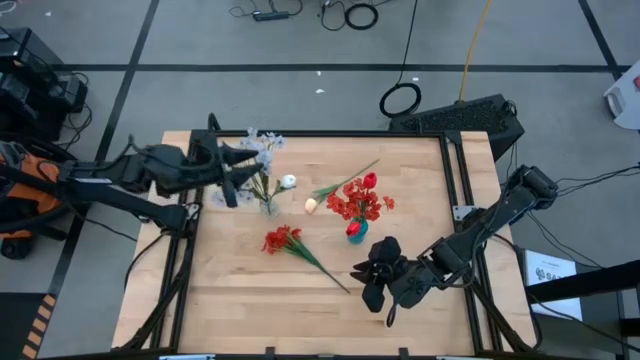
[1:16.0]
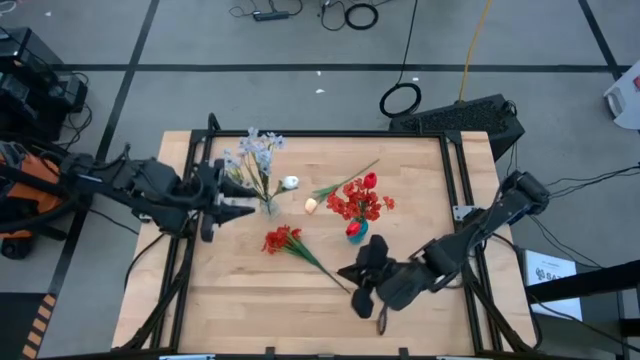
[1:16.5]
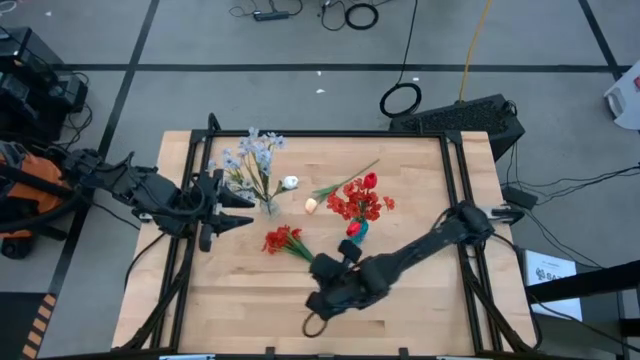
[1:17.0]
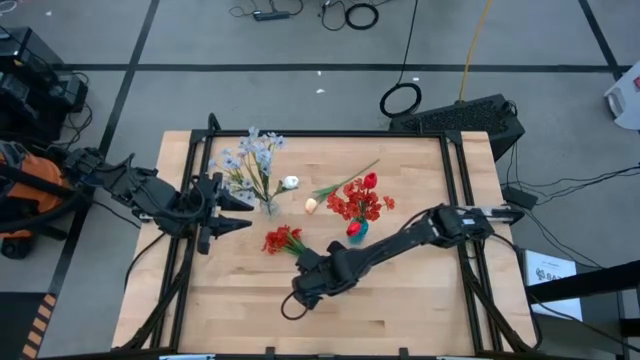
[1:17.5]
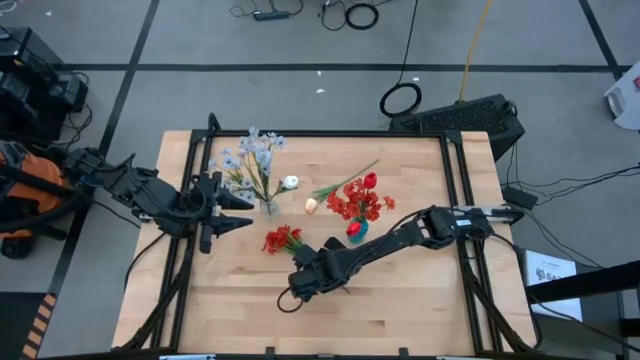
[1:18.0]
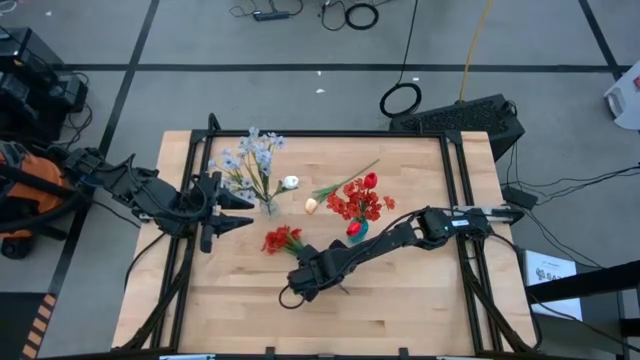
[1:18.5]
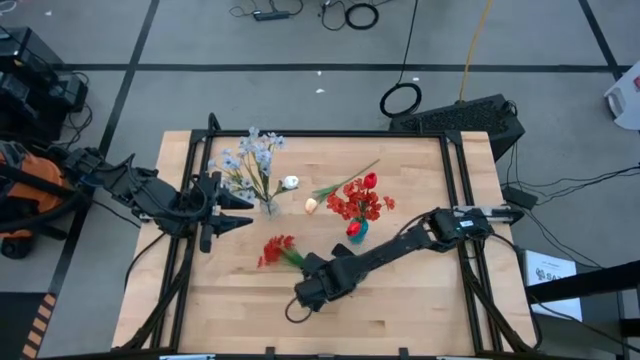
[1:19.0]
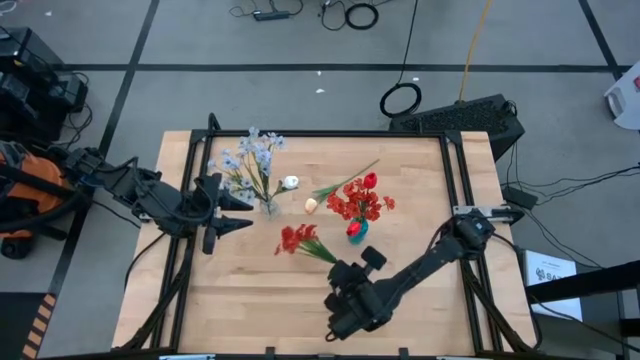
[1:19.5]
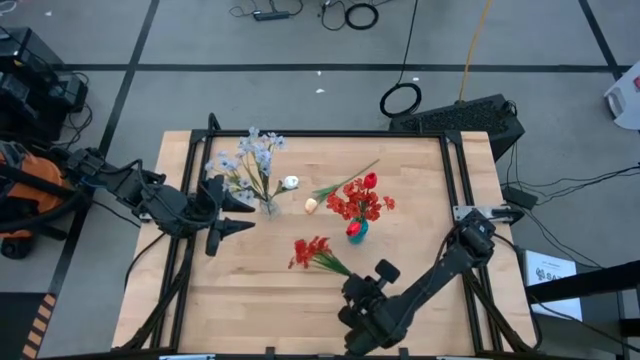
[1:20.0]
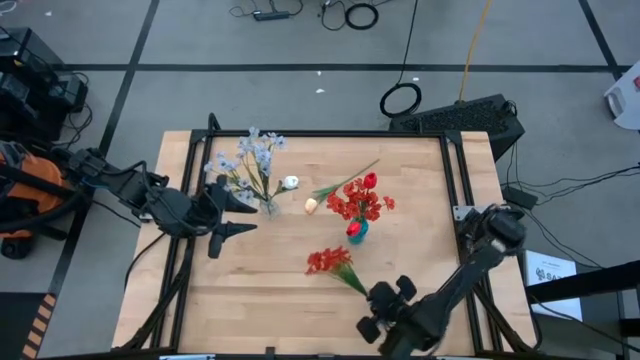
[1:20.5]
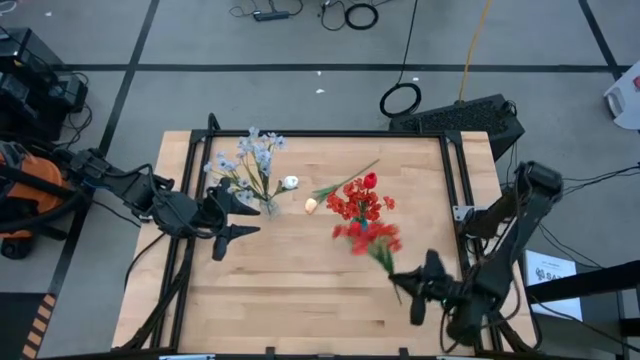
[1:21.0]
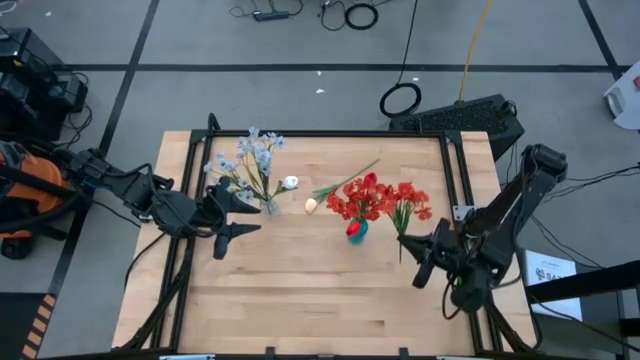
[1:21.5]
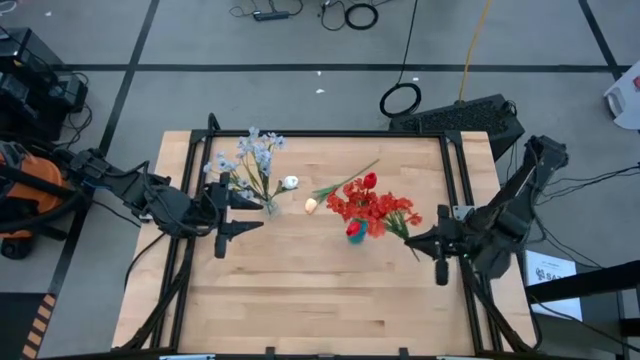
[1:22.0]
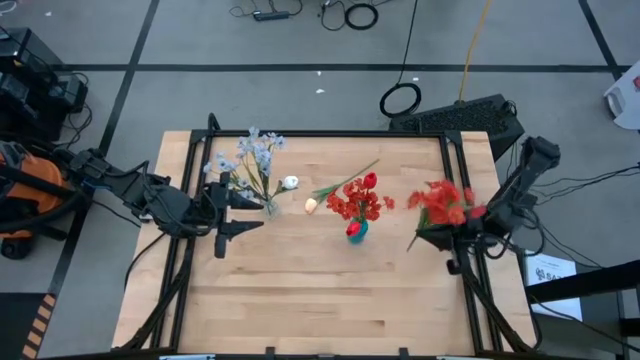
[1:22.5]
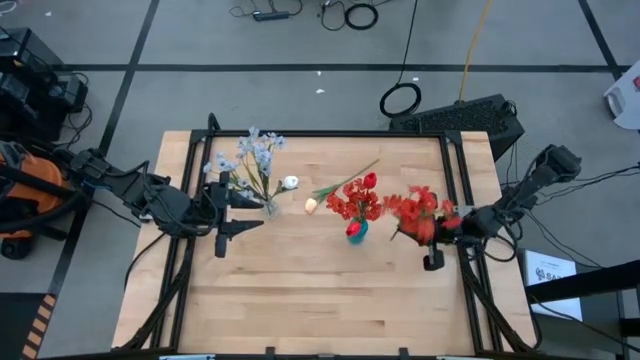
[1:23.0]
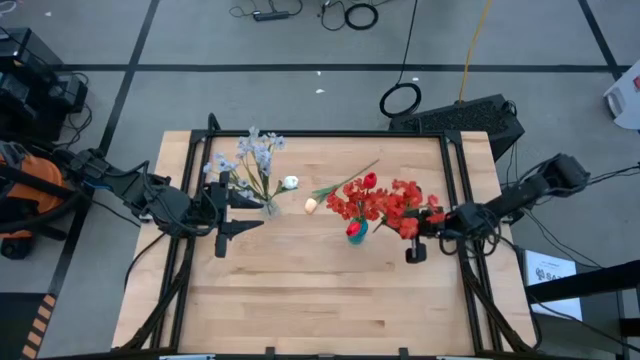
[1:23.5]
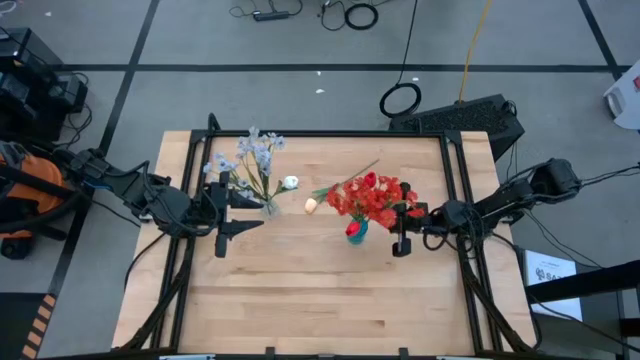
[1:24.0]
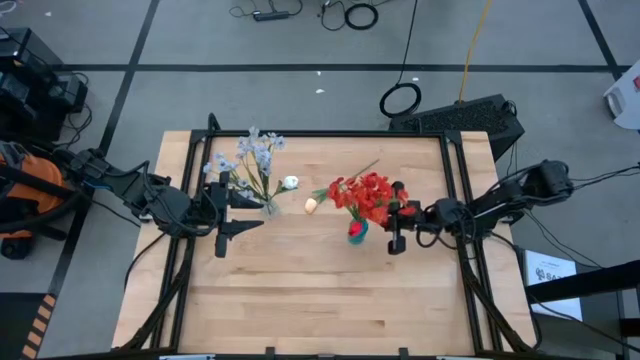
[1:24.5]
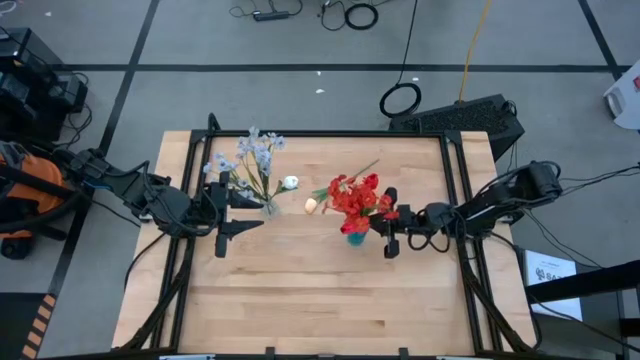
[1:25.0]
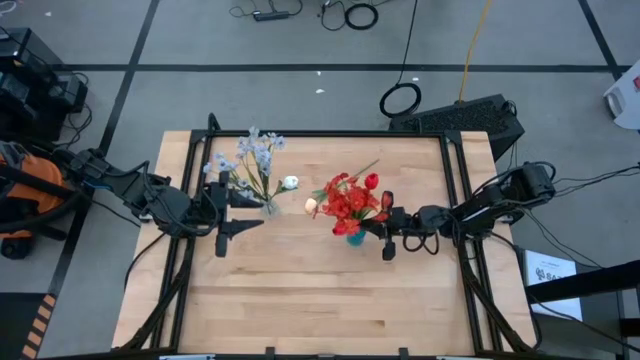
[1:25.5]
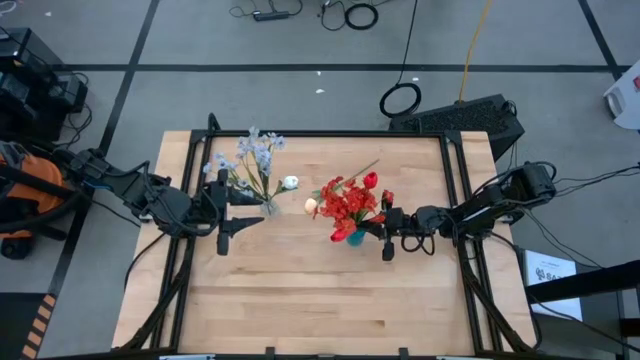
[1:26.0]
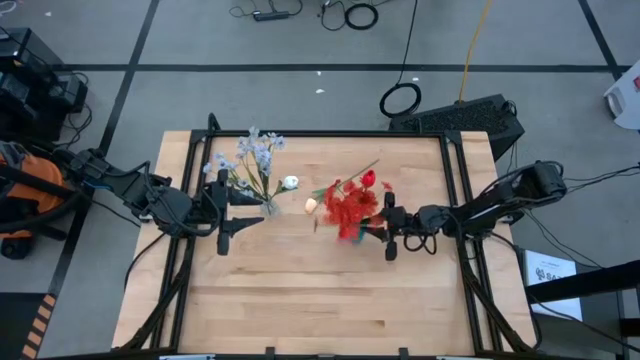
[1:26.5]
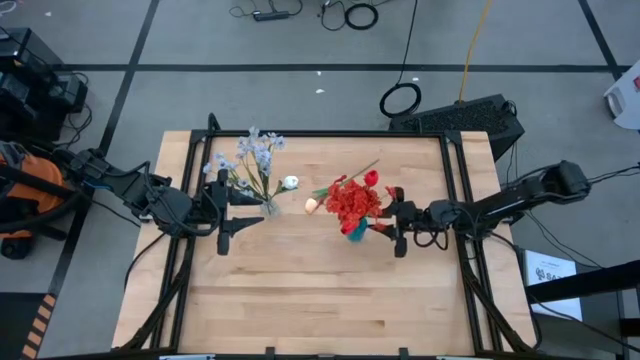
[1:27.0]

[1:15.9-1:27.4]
Task: Sort flowers into vase by color
Put the red flowers into the blue vase

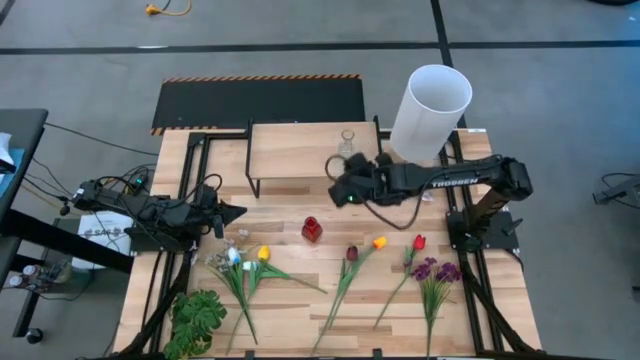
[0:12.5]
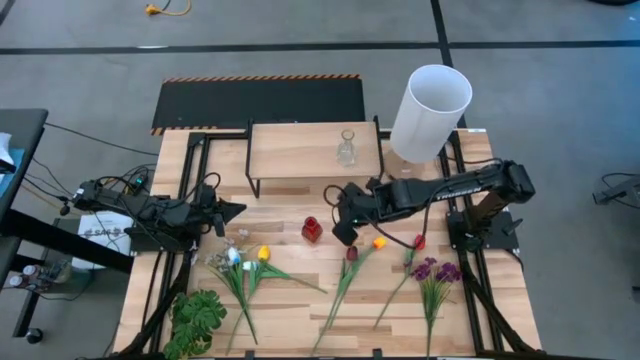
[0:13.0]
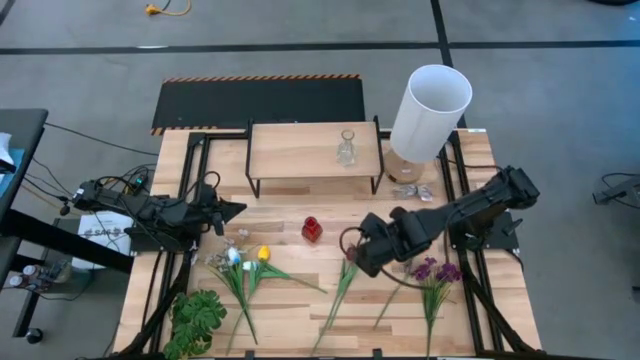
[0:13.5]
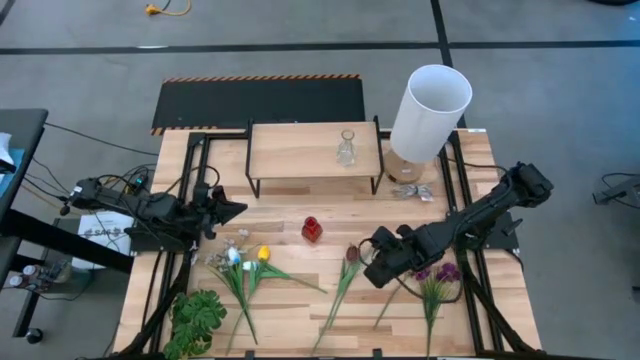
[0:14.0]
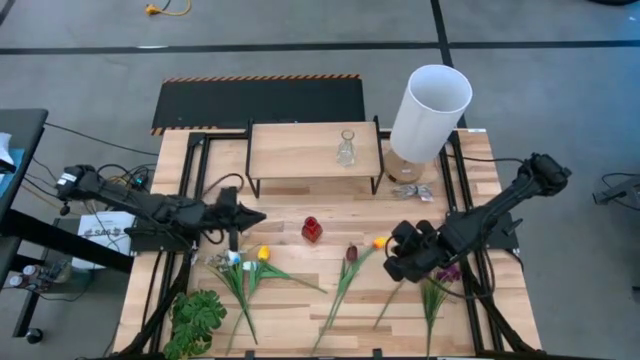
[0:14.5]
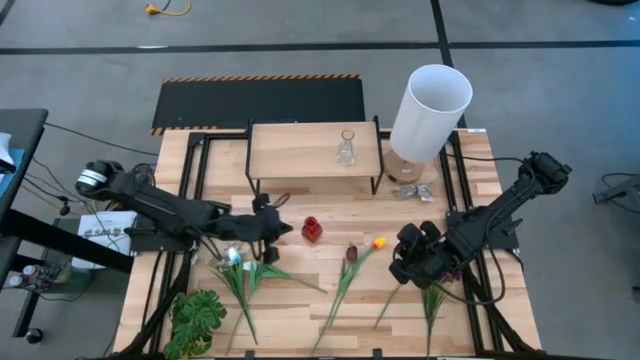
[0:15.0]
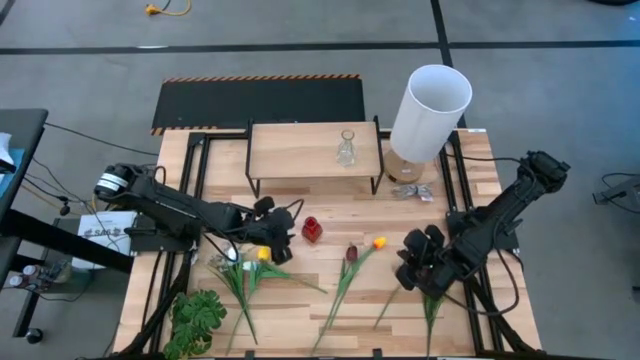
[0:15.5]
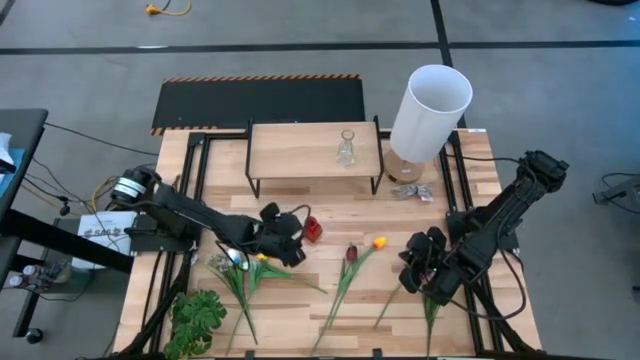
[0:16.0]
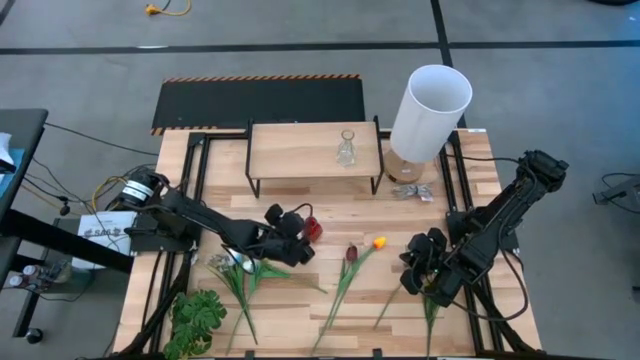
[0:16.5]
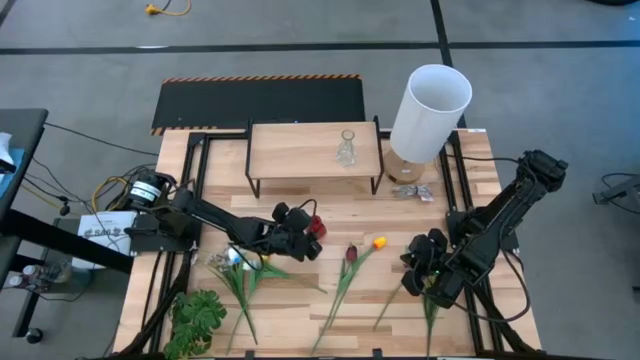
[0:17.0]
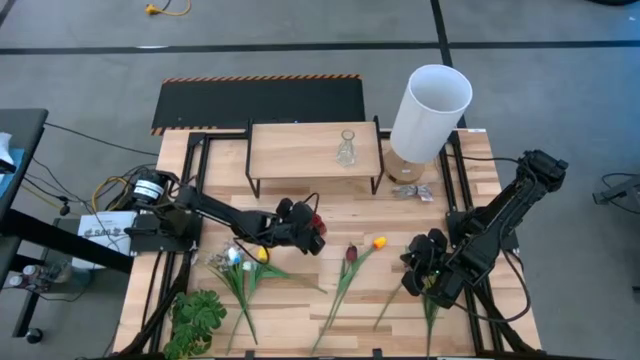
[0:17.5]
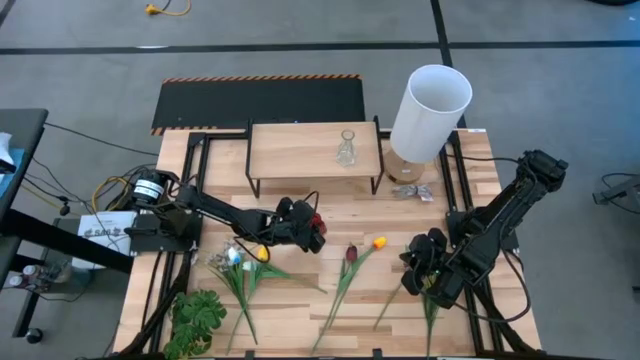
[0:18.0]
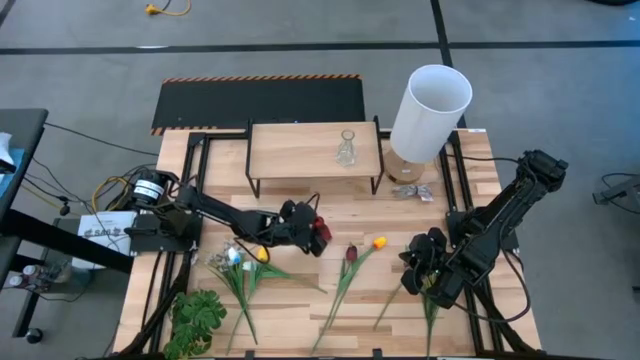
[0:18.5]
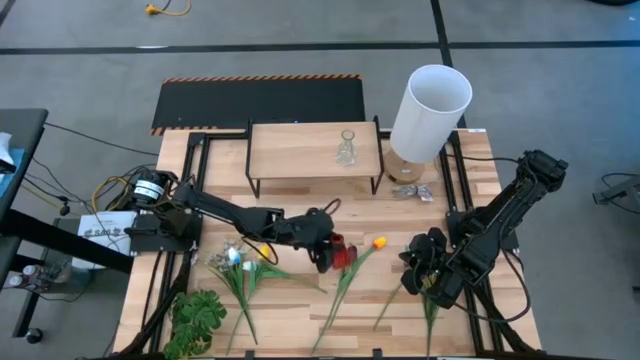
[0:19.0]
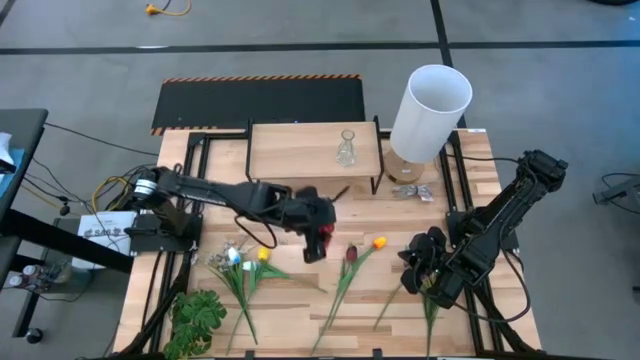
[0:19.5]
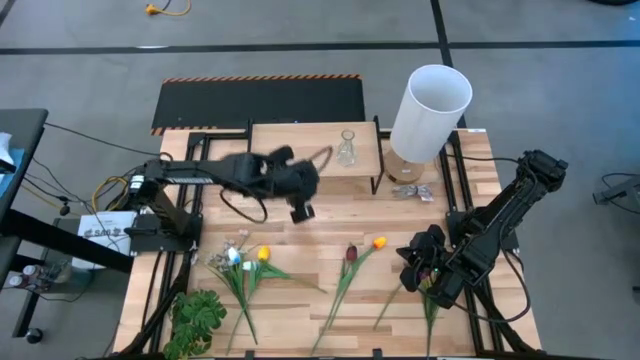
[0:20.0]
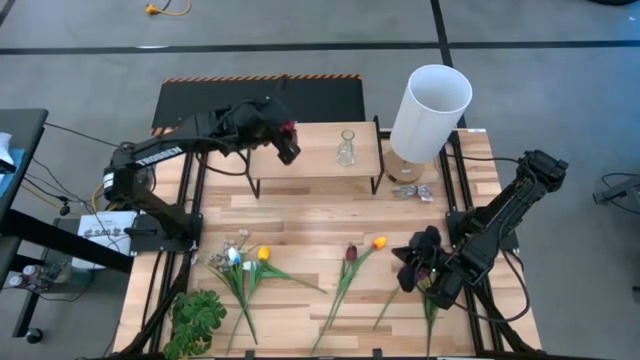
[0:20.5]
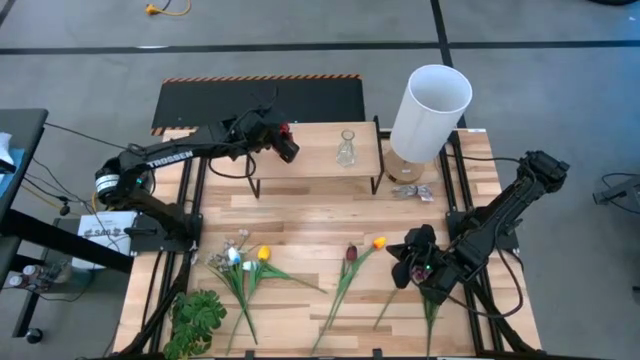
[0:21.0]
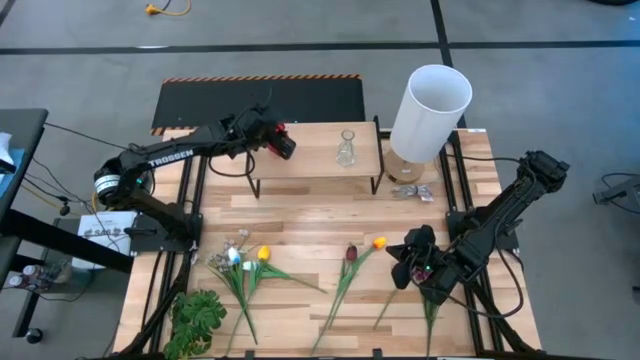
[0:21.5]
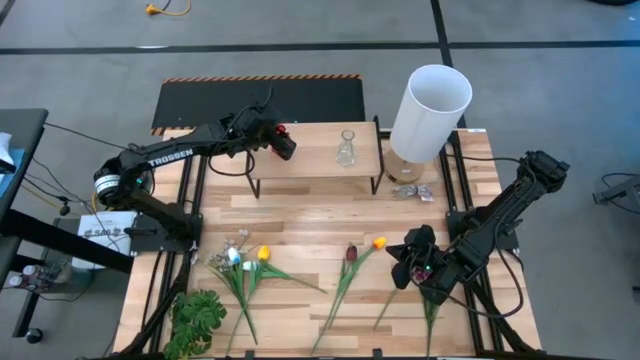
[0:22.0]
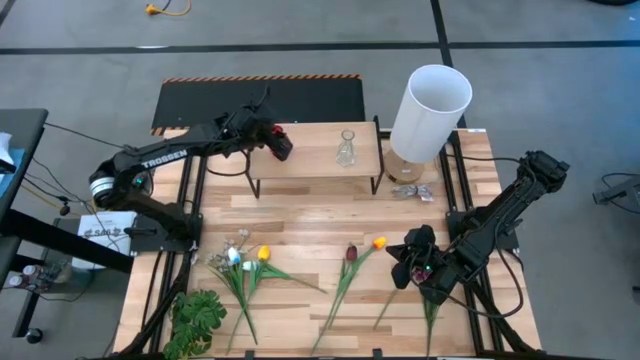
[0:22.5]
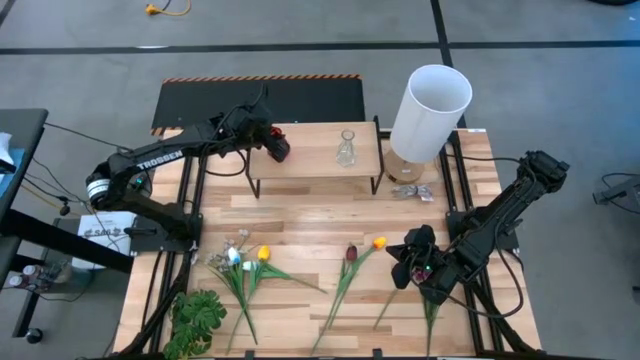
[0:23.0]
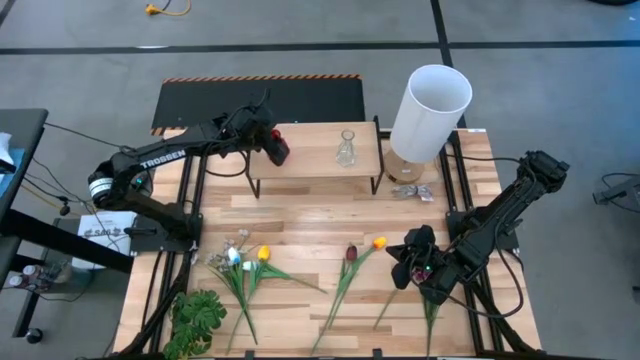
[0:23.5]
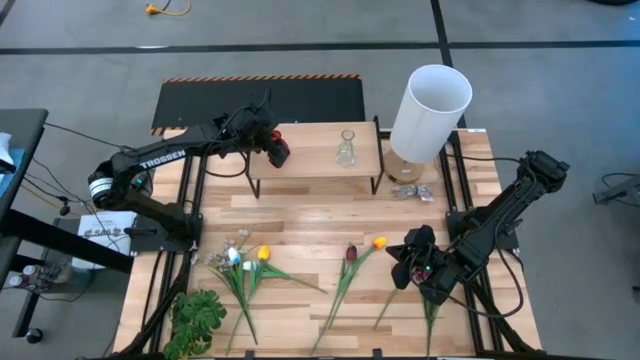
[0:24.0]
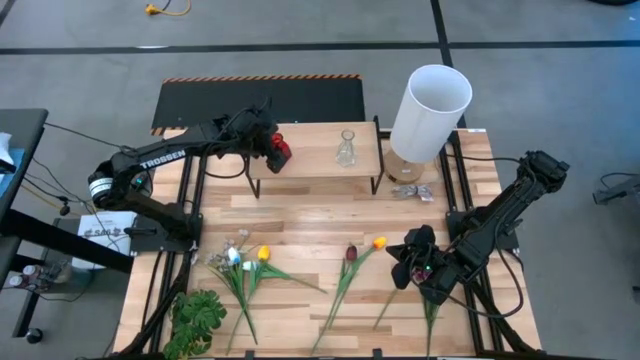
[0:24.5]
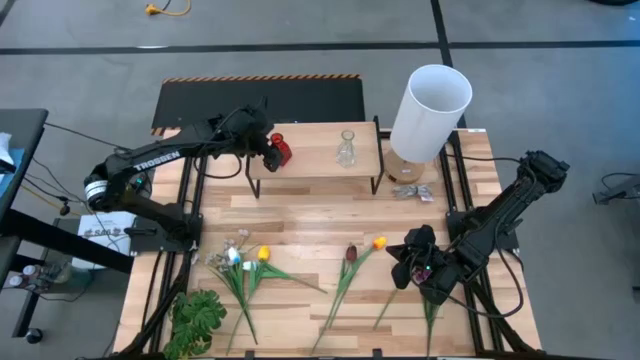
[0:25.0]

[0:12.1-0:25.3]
Task: Pick and place flowers into a vace then onto a shelf
Put the red vase on the shelf
